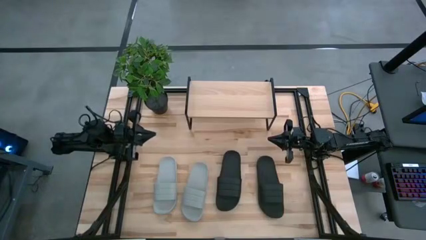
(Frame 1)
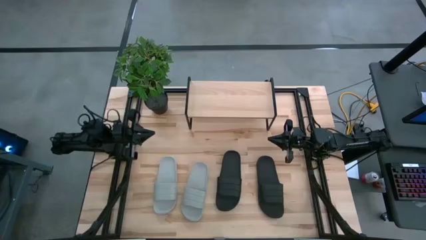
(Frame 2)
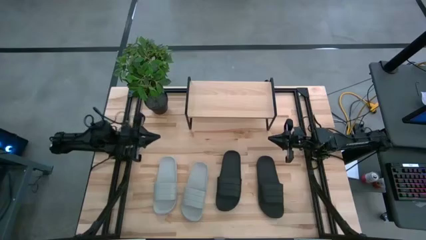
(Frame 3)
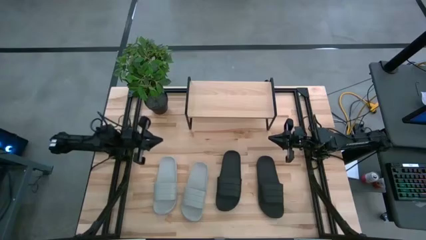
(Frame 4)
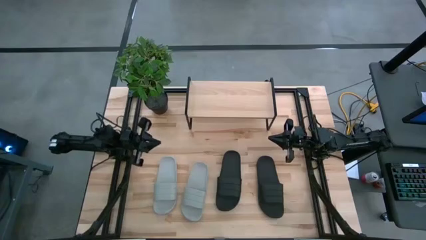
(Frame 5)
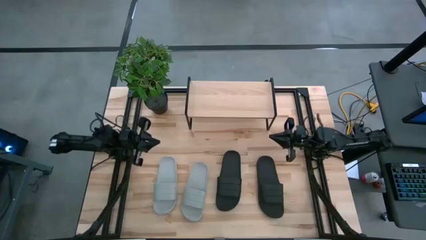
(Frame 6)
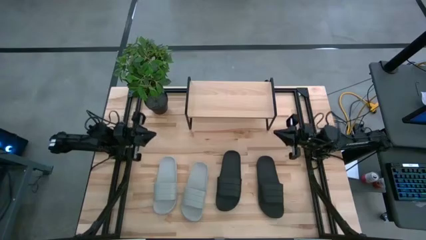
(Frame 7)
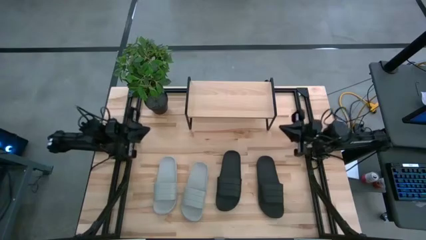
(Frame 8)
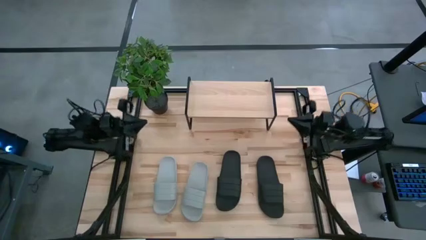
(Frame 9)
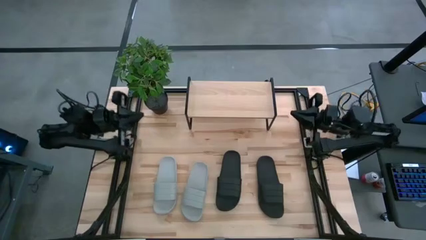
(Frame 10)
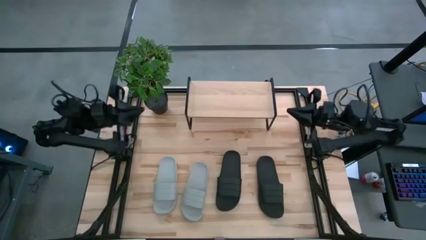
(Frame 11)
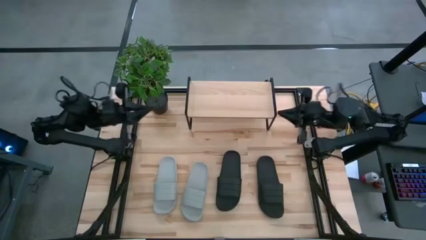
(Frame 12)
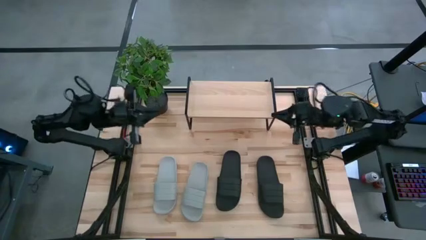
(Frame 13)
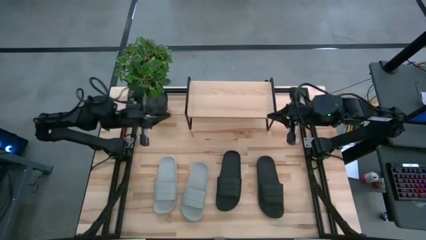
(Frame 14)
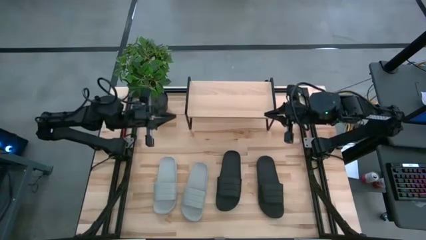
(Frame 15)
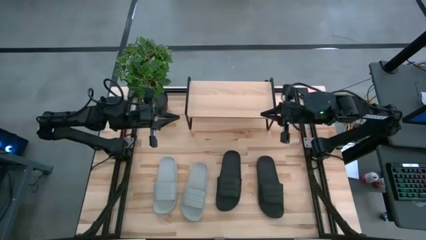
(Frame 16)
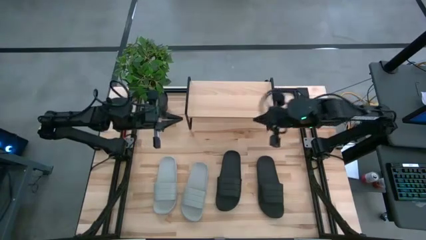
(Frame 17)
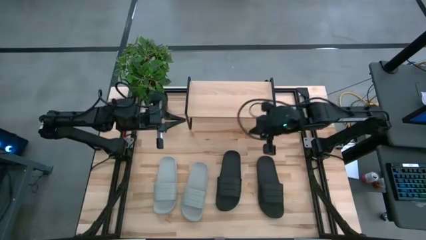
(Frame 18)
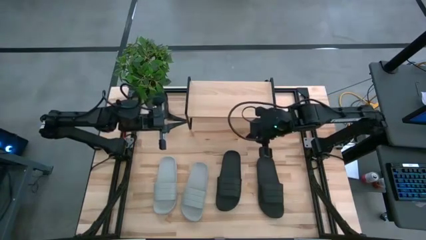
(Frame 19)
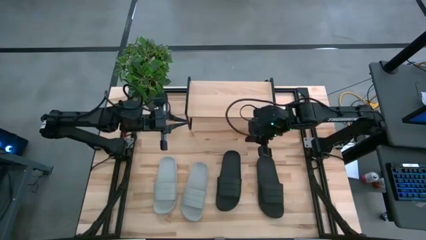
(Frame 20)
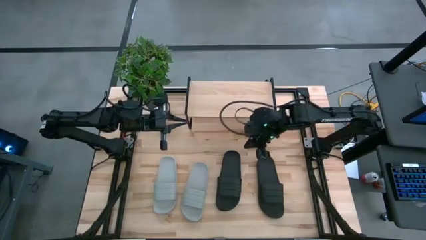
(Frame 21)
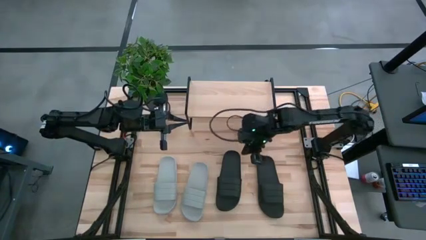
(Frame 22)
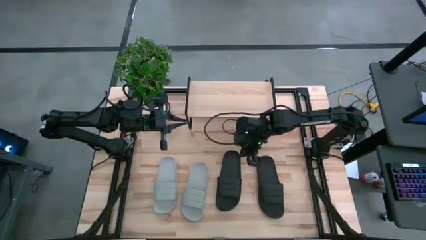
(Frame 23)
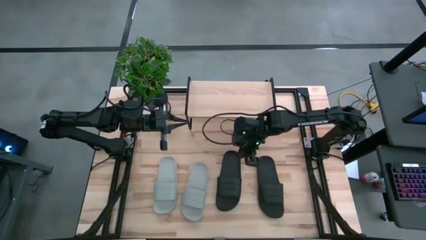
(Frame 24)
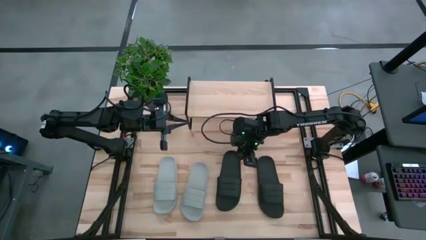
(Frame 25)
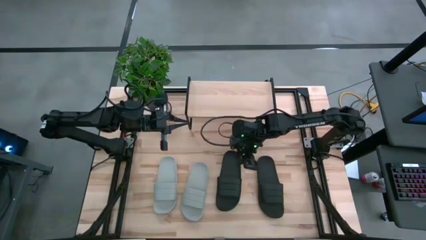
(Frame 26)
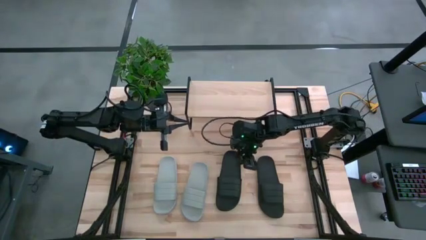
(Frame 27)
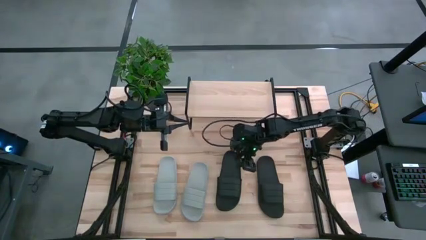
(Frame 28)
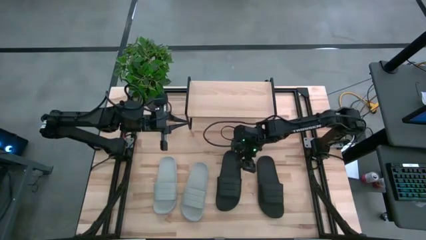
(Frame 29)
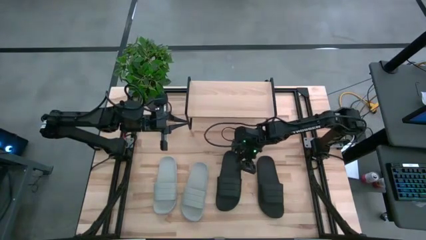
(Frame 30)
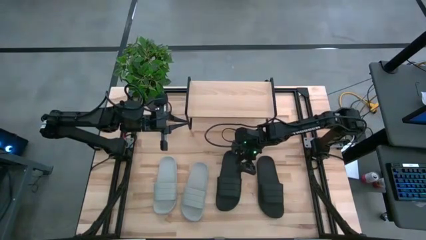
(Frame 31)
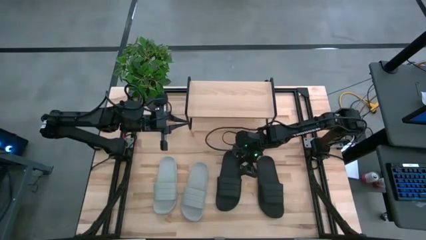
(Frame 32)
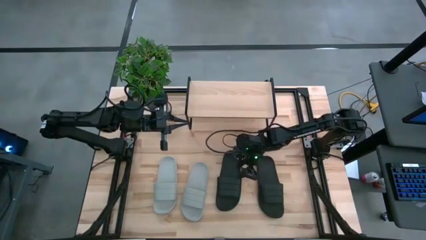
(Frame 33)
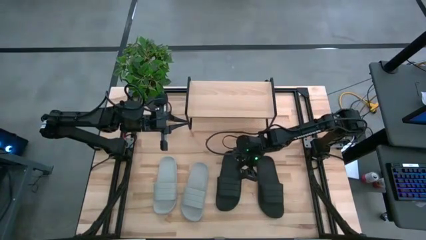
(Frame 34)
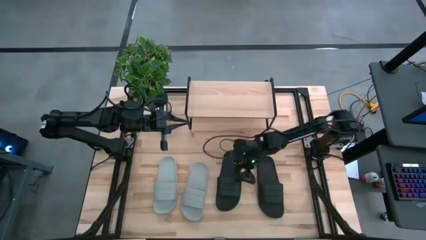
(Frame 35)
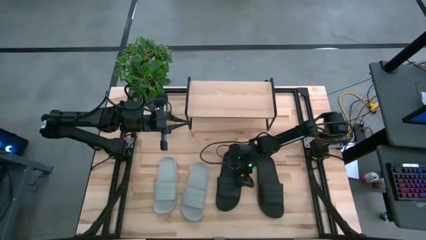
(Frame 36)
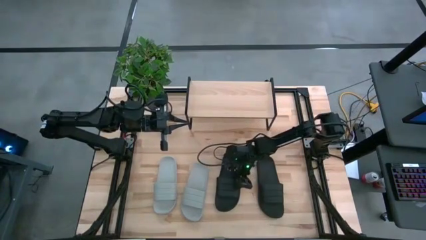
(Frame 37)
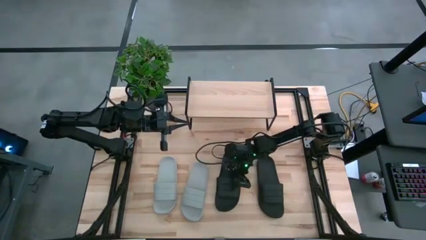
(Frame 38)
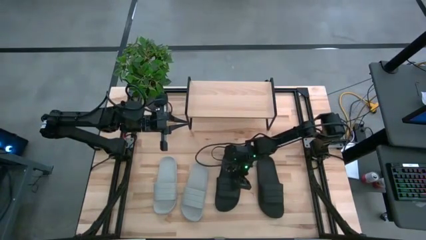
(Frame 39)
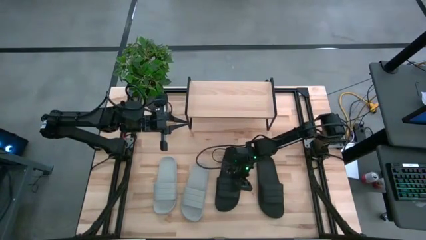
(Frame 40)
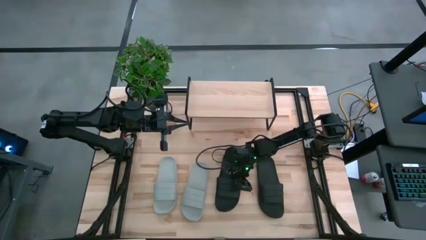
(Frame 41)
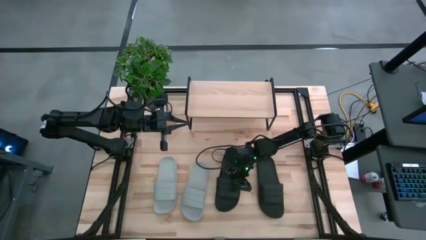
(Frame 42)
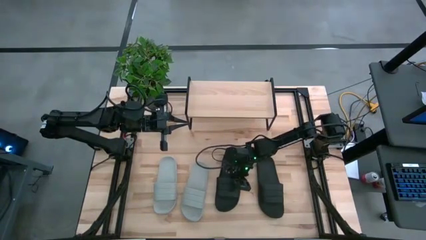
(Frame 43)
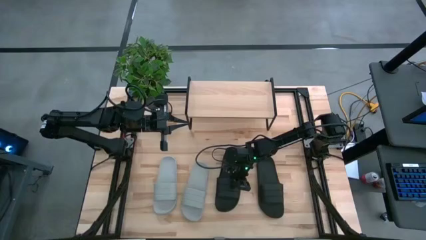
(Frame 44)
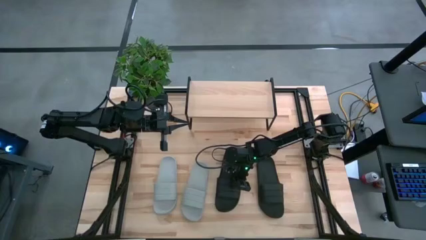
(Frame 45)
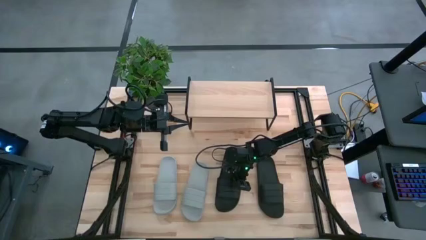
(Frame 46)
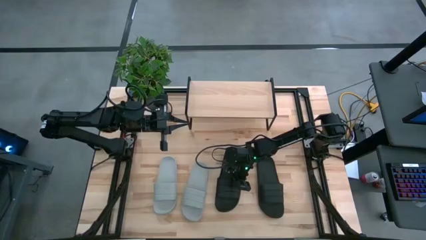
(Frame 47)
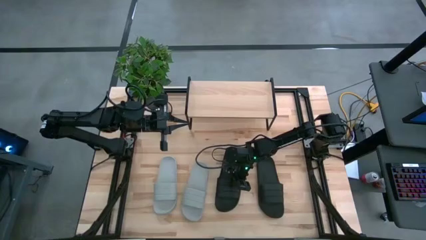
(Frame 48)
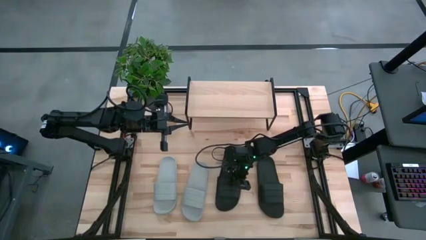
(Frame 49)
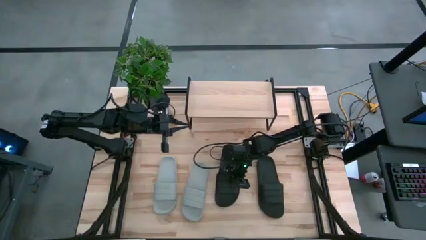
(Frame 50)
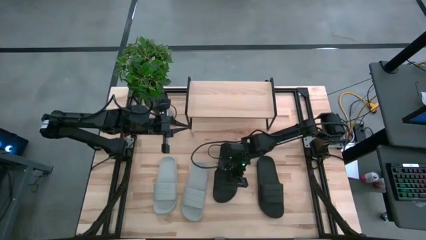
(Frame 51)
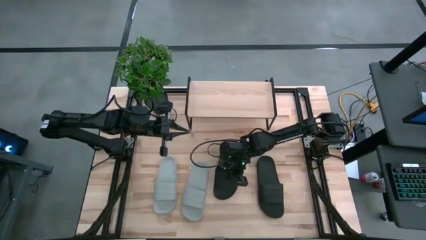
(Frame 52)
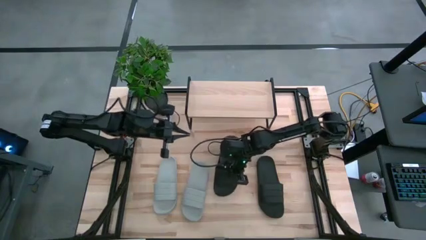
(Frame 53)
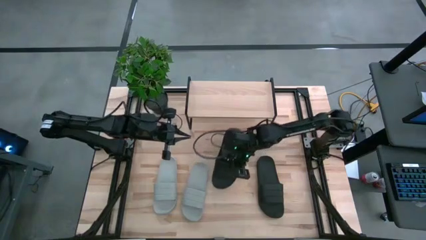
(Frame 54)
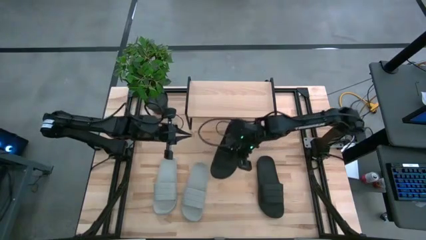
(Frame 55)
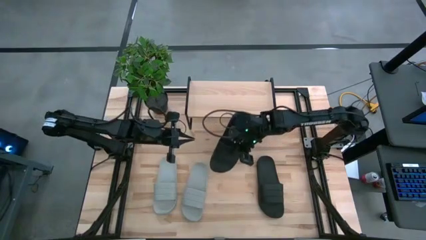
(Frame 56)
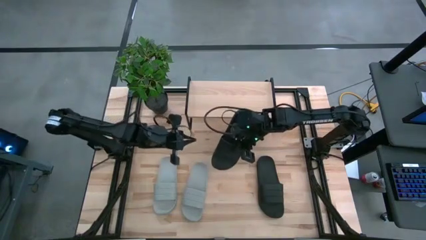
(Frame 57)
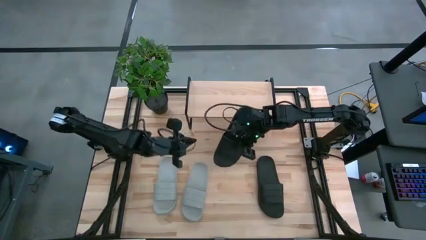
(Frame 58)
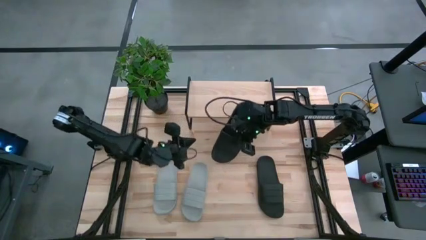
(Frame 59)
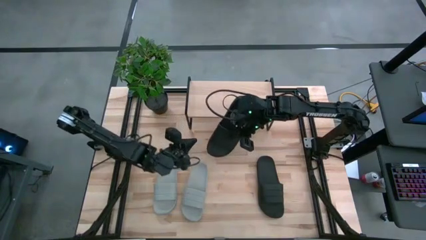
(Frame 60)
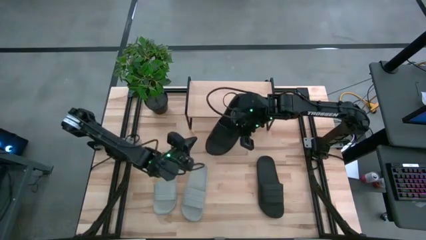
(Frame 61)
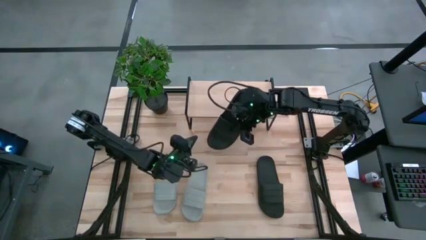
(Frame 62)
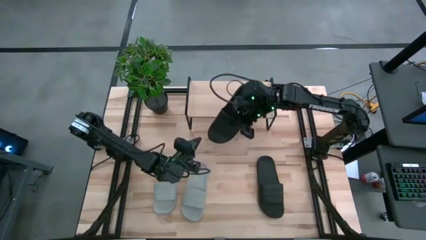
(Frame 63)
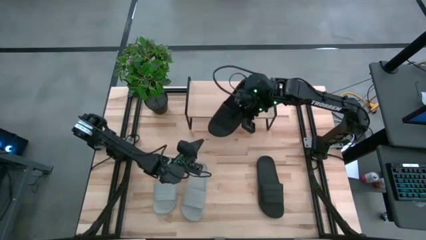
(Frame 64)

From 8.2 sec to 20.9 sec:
Task: Pick and place slides into the shelf
Put the left black slide on the shelf
